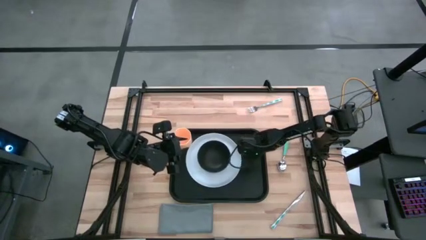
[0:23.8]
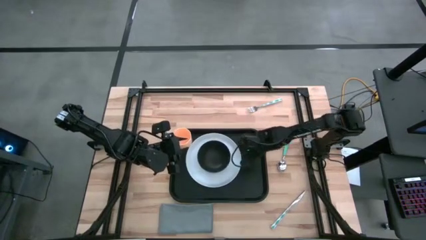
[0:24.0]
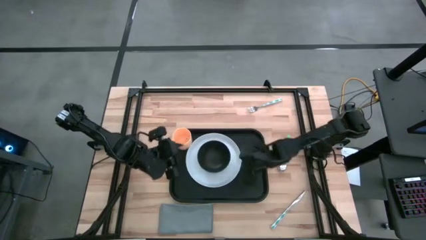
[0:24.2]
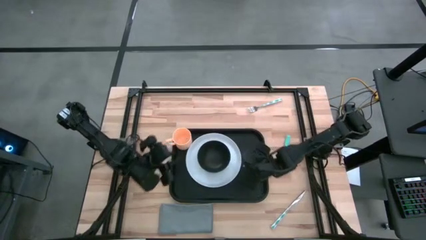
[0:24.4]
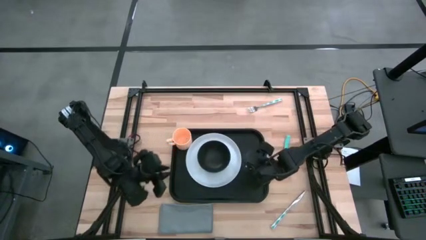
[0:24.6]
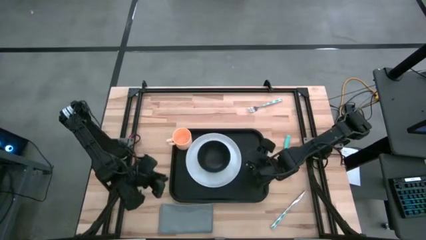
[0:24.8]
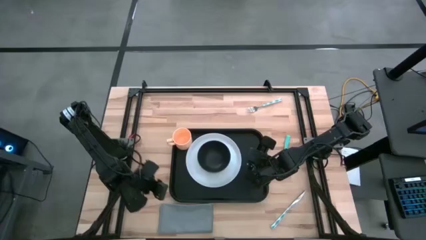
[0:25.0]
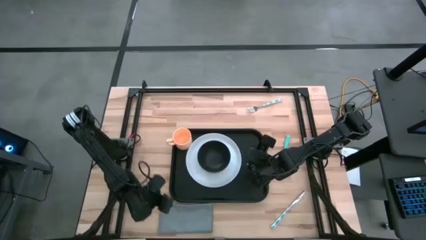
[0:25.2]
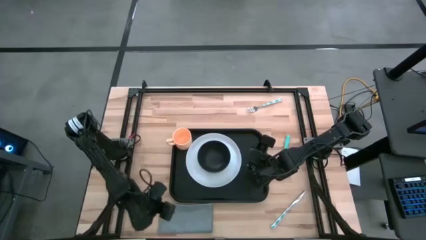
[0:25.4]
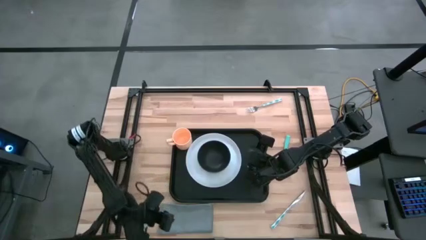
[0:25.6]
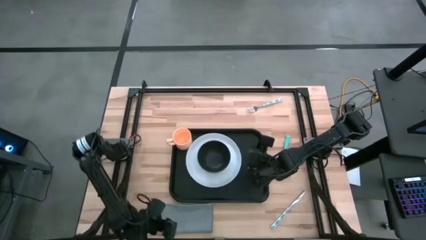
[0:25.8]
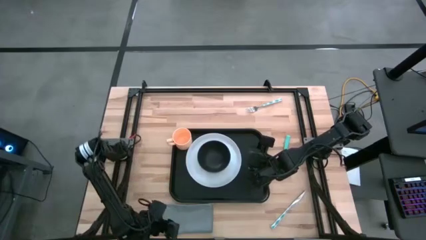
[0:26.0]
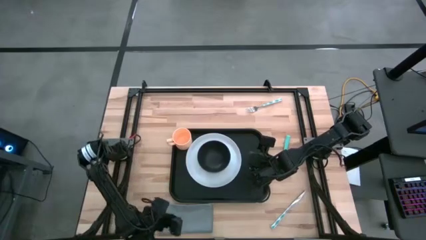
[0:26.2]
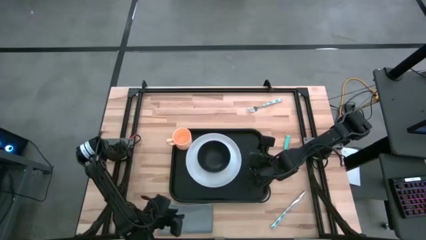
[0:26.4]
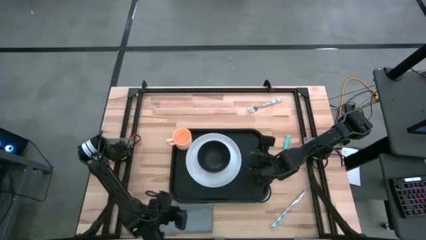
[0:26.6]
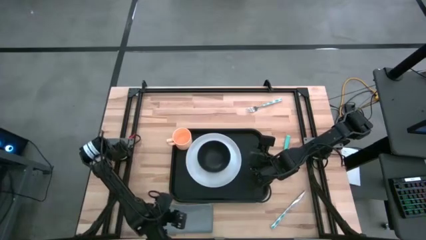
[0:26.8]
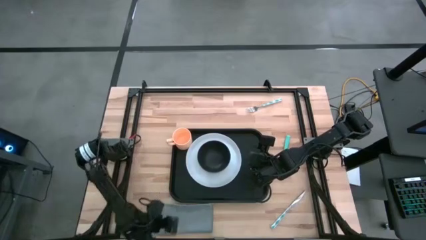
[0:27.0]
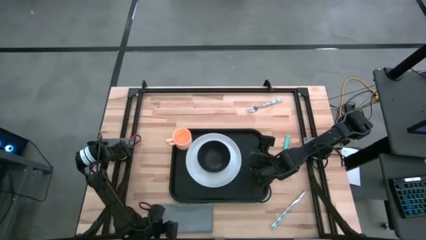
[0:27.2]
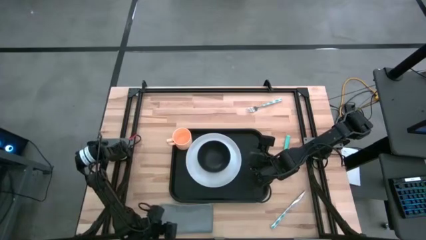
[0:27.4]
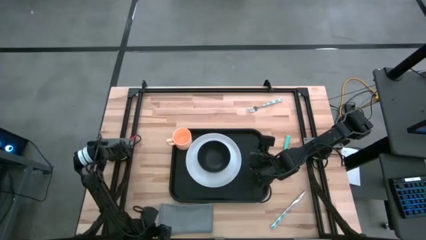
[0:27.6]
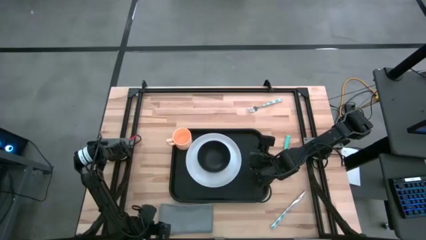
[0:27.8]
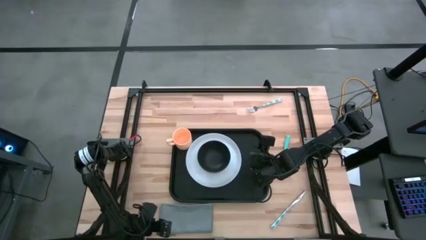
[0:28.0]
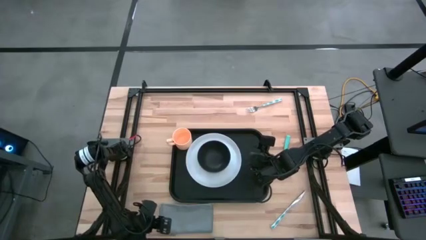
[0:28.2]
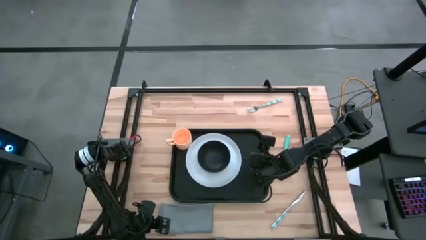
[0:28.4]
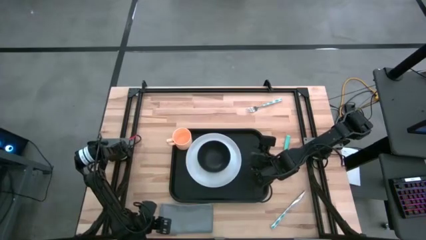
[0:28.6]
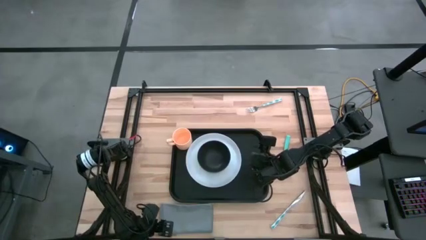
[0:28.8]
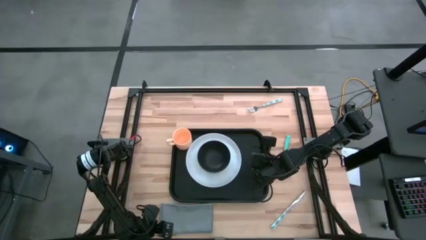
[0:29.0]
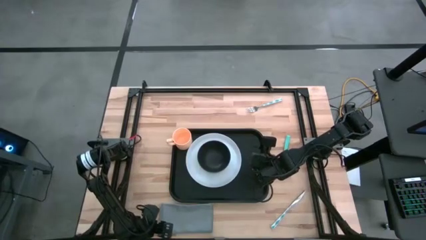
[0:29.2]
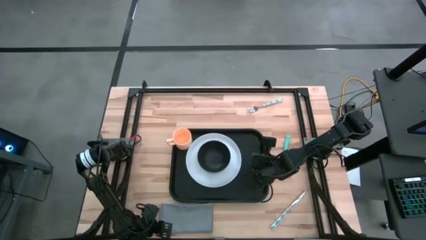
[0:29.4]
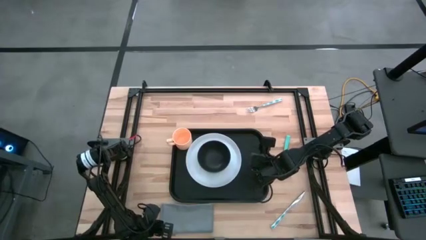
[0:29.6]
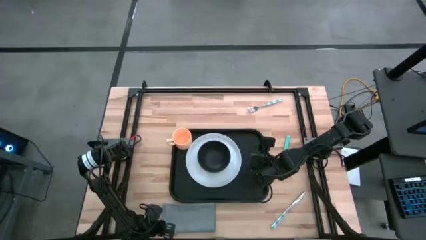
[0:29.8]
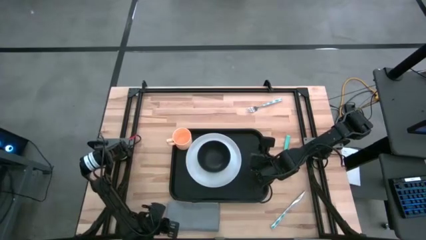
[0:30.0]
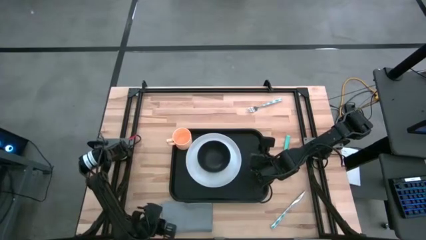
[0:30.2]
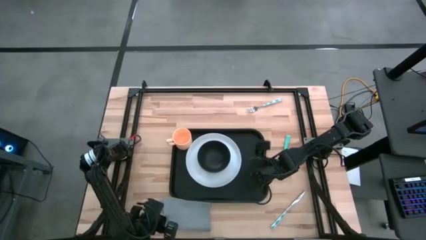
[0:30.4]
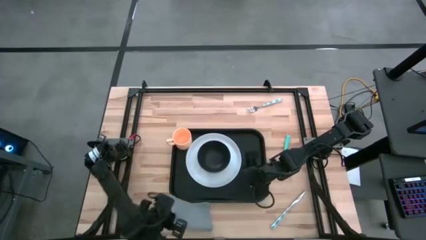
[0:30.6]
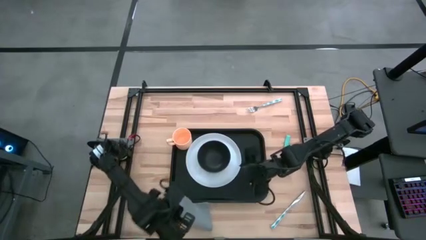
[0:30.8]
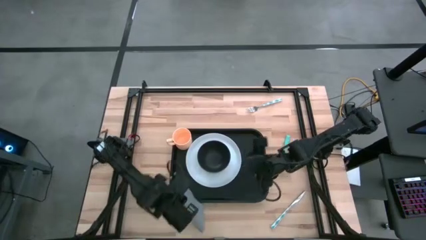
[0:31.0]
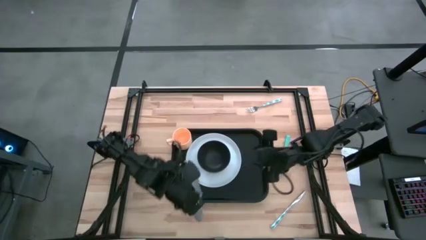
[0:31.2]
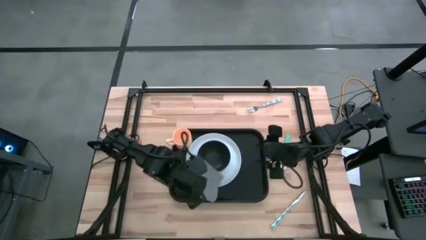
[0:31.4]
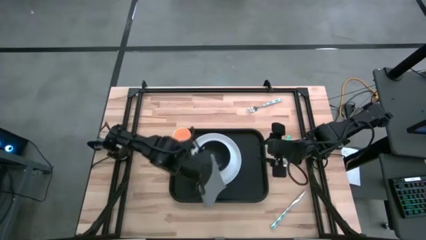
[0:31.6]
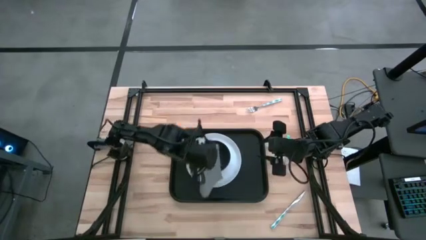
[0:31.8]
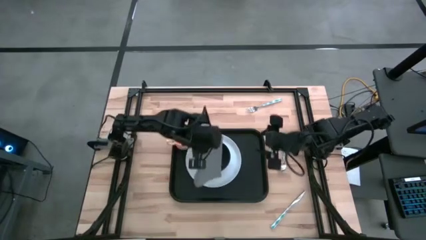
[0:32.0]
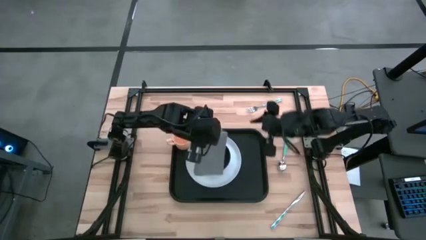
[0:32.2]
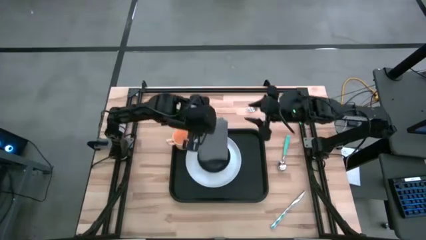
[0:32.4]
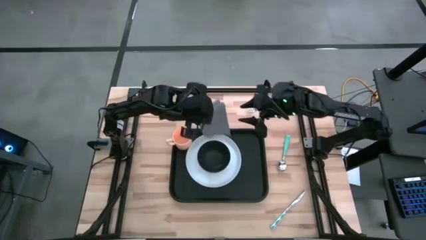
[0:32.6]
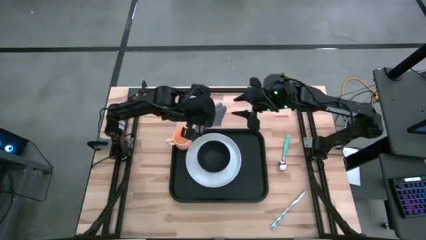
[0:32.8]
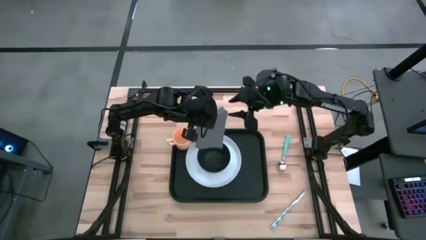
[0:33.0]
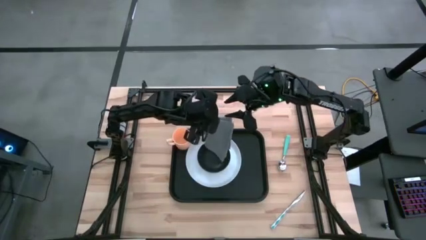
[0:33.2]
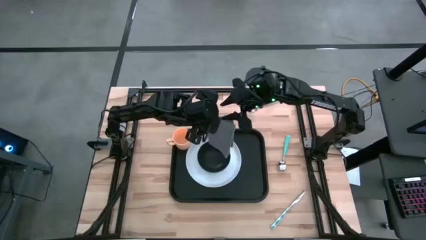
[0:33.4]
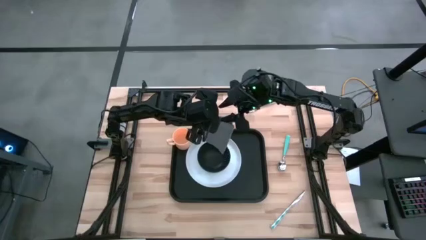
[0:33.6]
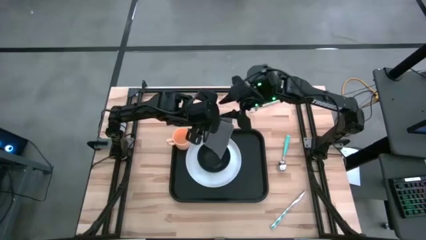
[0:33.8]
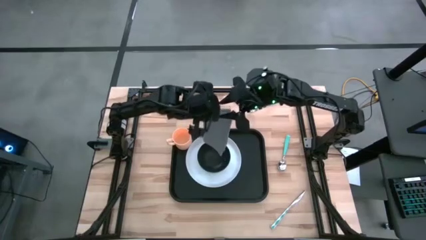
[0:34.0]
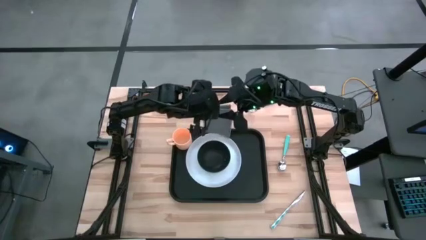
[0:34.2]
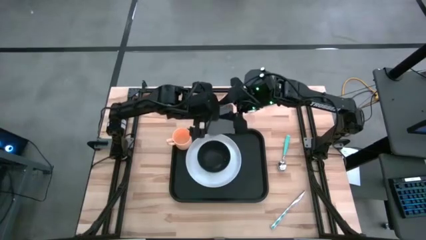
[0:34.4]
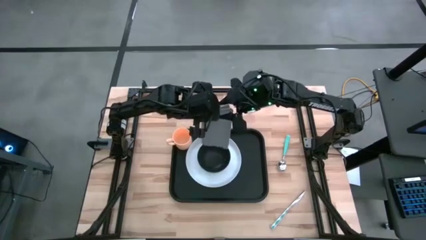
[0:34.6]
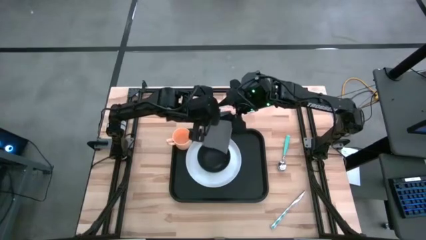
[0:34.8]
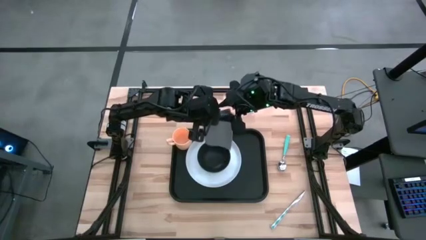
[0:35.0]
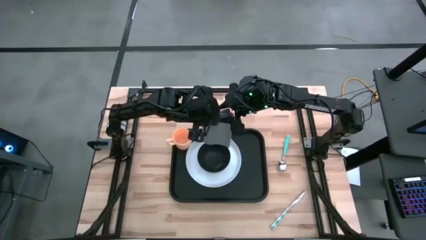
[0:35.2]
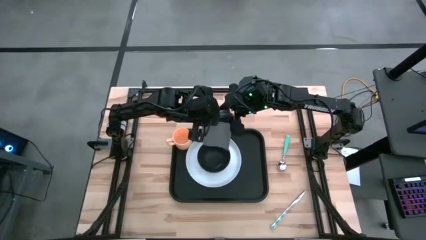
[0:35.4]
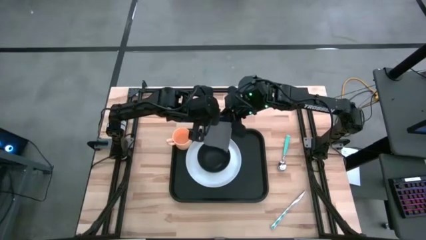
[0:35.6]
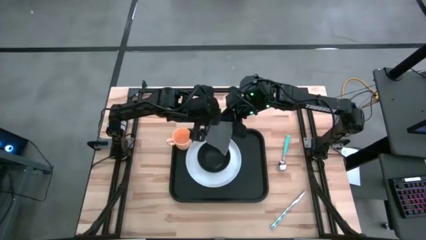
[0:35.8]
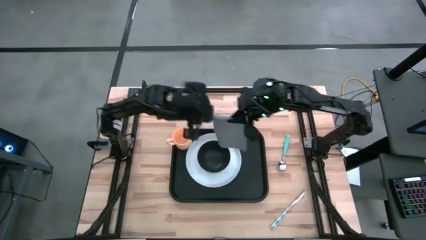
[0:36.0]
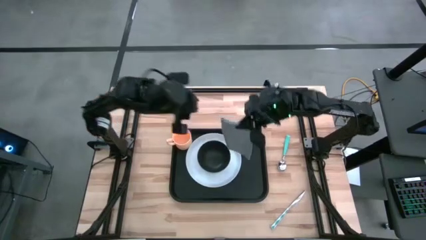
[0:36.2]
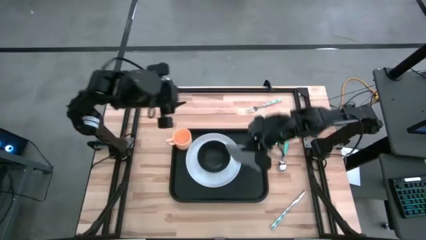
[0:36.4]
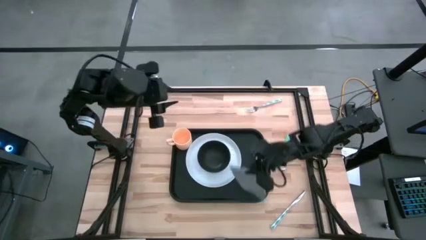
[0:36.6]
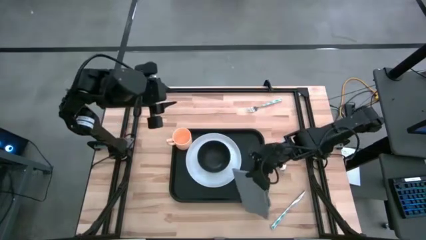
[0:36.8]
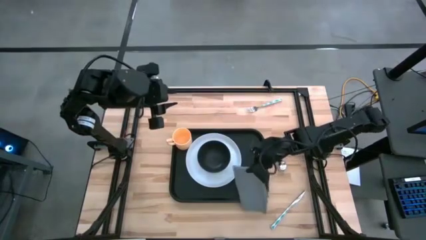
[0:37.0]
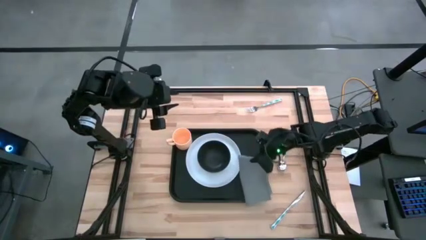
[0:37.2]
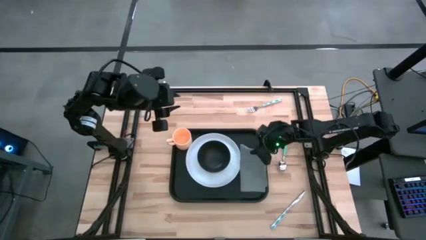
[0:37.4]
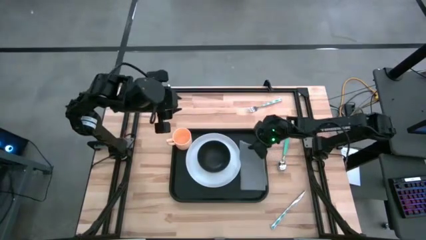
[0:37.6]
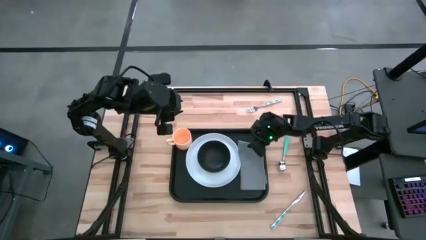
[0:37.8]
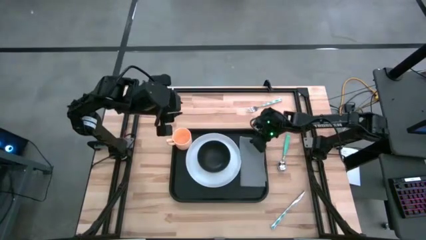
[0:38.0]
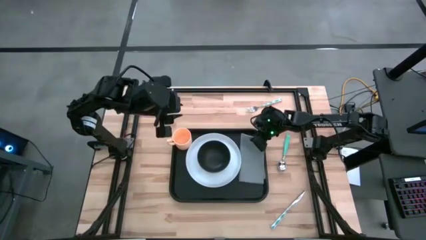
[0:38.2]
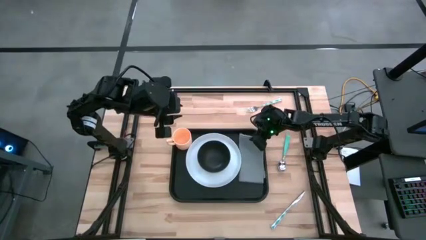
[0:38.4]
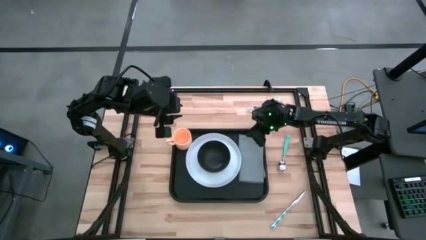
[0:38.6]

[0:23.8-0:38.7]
Task: Set up tray
Put the gray napkin to the right of the white plate on the black serving tray

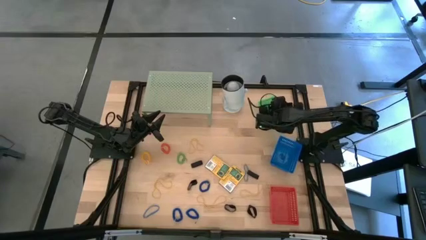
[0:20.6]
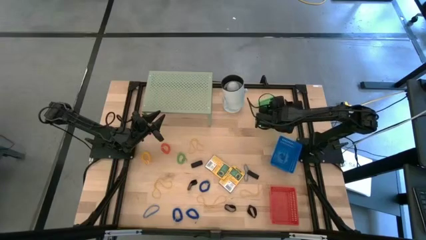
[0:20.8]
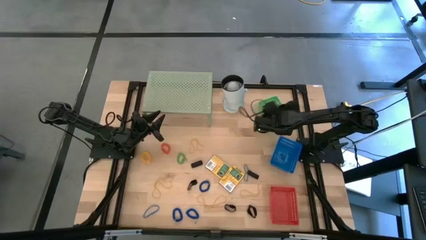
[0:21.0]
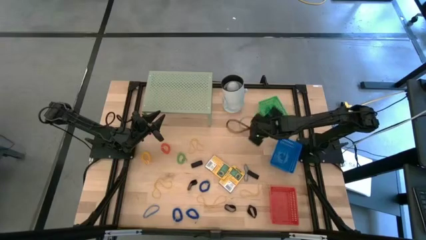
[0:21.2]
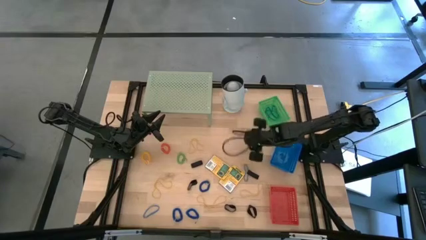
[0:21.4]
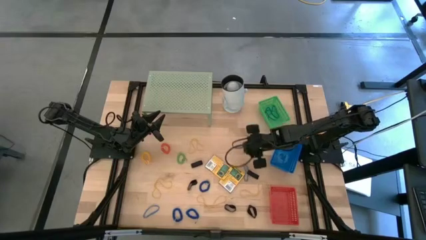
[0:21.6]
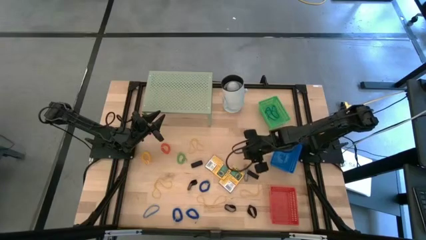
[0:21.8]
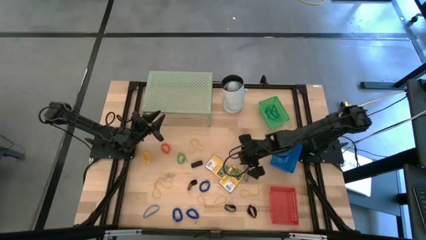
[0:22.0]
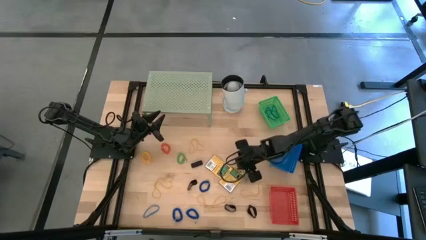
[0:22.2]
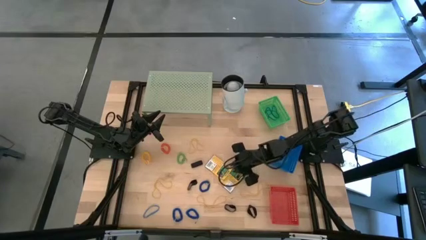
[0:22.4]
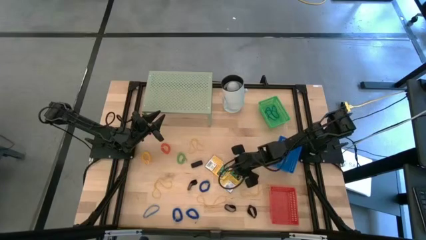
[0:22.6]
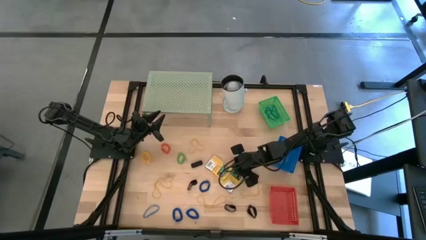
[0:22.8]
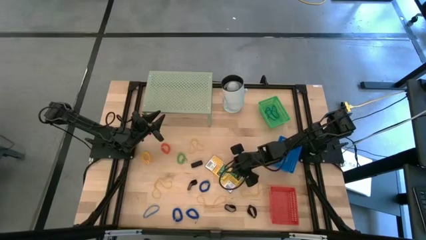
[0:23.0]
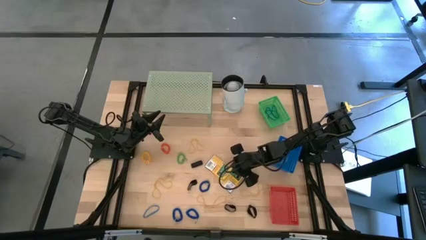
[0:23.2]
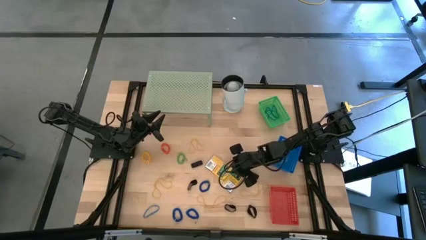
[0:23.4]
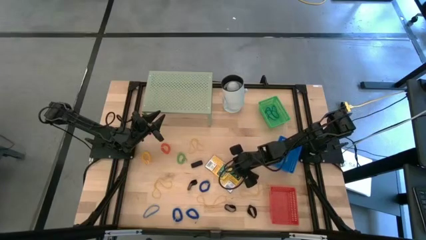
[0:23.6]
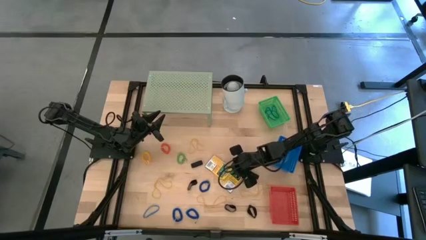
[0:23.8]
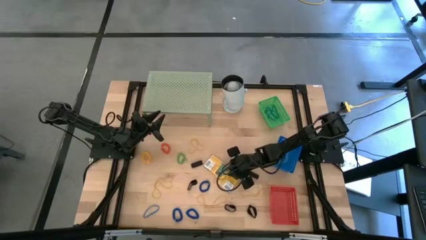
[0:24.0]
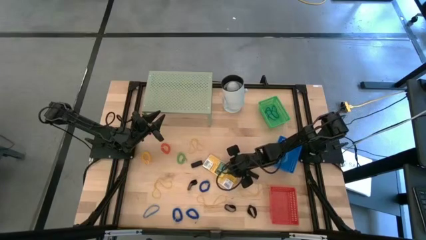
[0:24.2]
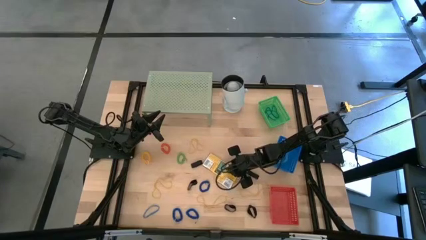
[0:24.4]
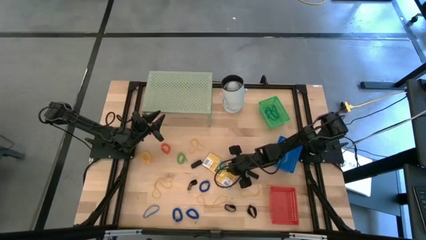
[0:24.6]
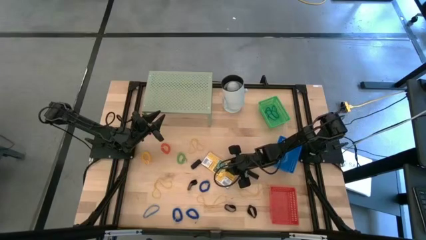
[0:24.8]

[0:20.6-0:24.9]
Task: Pick & Place Office Desk Supplies
Put the yellow crayon box into the blue bin
